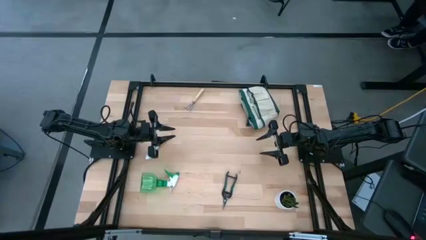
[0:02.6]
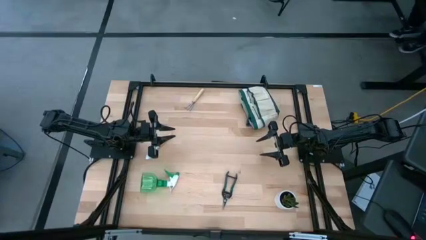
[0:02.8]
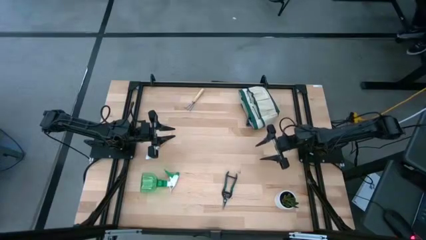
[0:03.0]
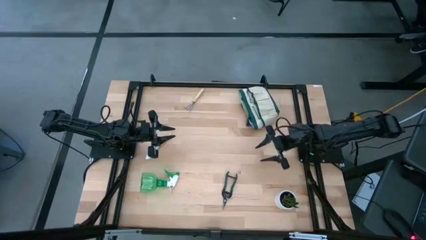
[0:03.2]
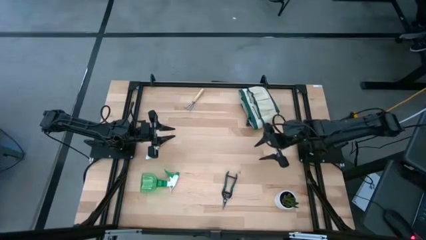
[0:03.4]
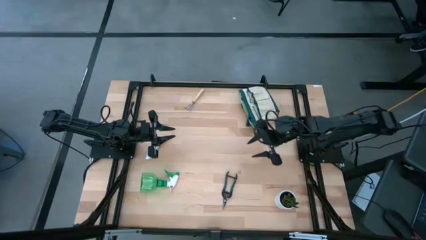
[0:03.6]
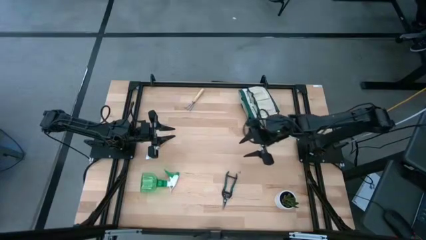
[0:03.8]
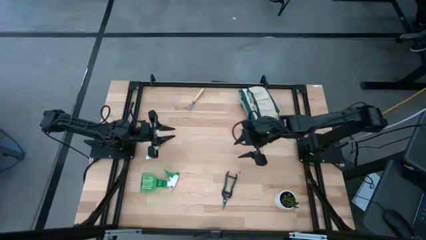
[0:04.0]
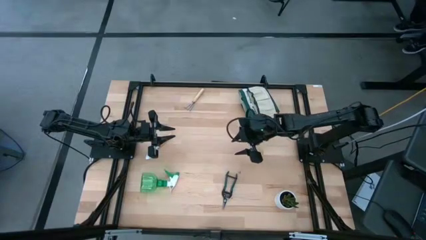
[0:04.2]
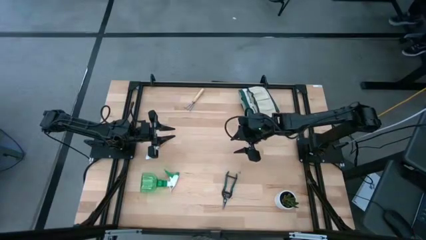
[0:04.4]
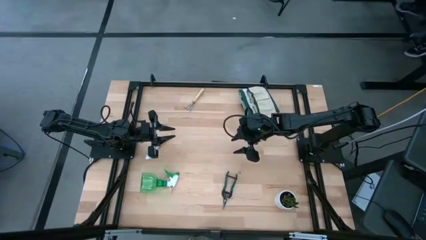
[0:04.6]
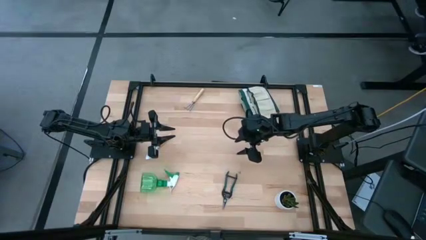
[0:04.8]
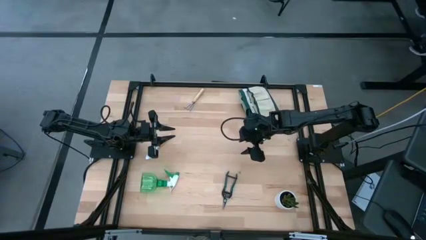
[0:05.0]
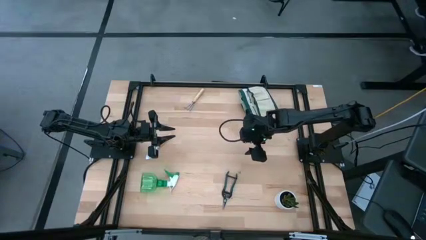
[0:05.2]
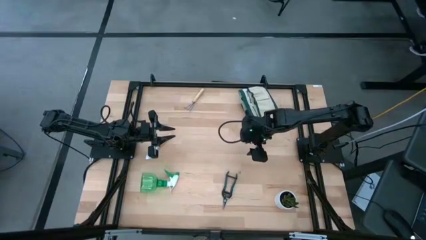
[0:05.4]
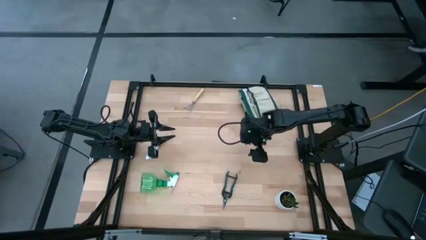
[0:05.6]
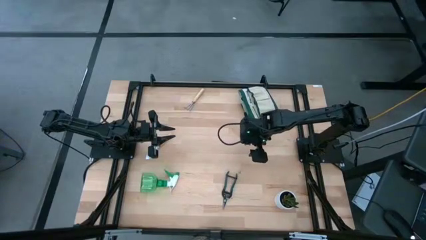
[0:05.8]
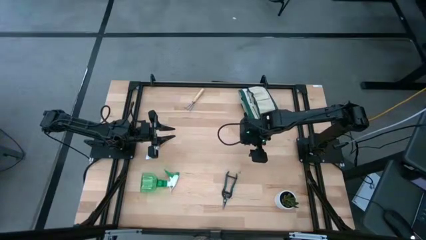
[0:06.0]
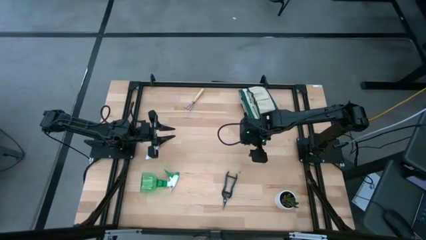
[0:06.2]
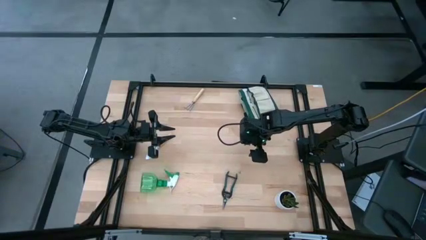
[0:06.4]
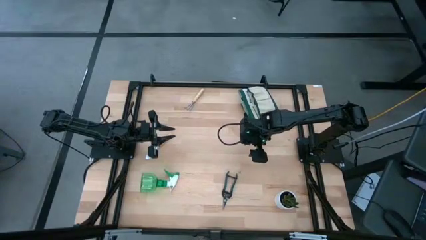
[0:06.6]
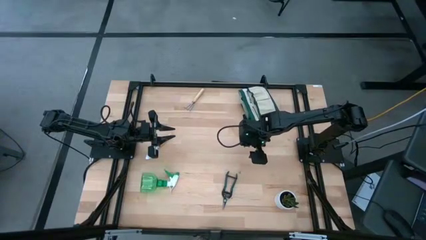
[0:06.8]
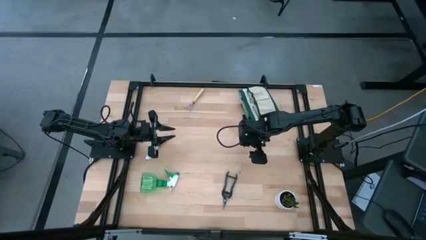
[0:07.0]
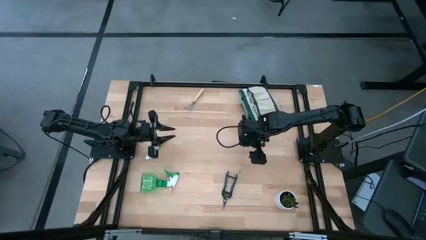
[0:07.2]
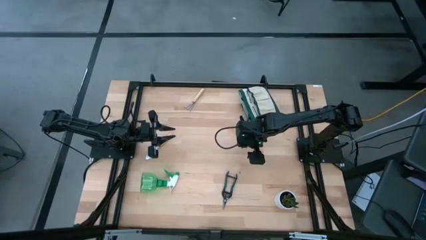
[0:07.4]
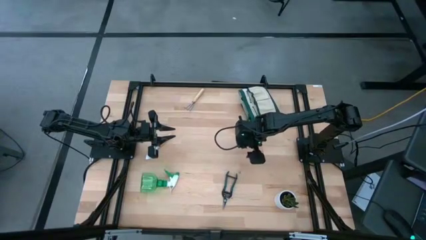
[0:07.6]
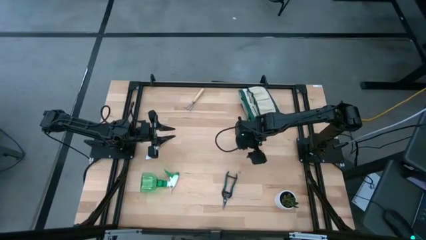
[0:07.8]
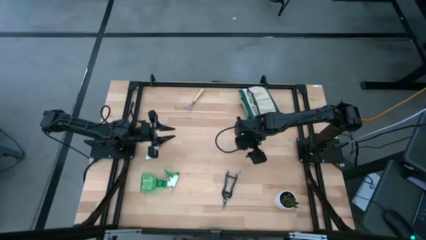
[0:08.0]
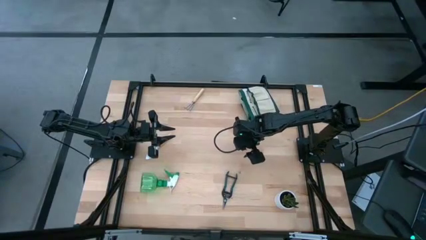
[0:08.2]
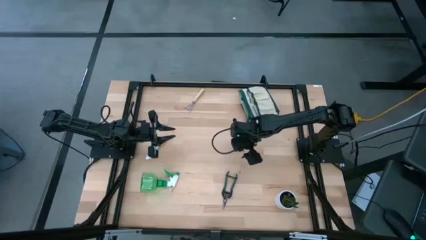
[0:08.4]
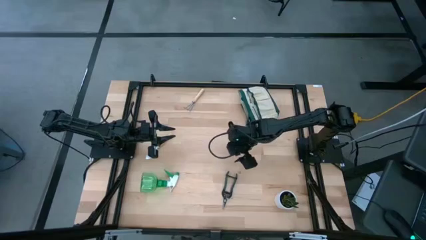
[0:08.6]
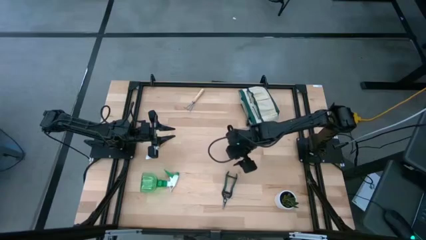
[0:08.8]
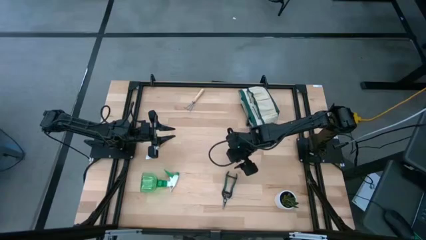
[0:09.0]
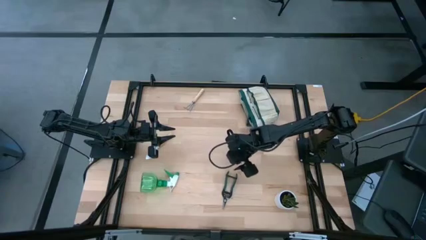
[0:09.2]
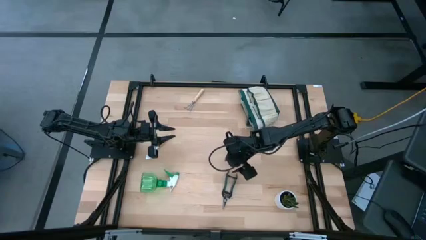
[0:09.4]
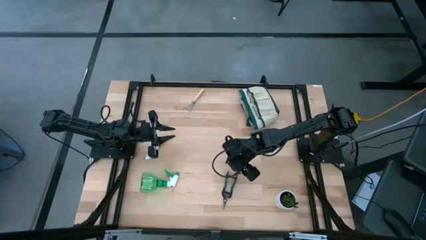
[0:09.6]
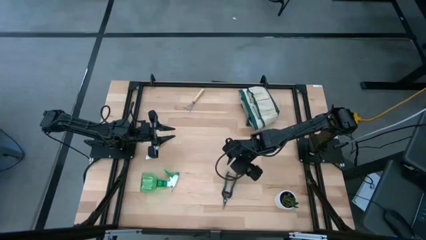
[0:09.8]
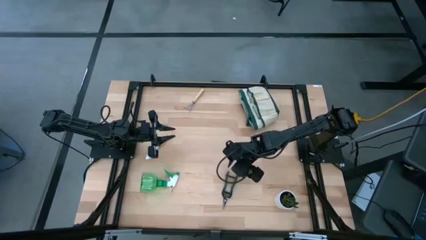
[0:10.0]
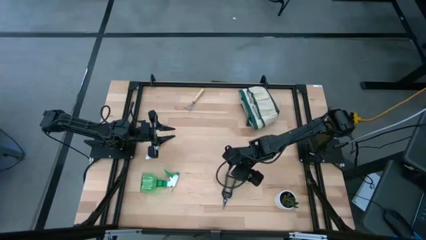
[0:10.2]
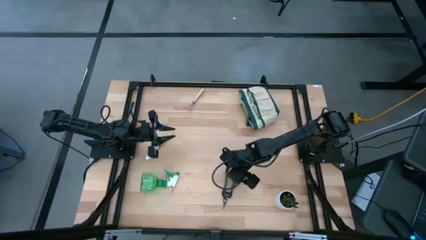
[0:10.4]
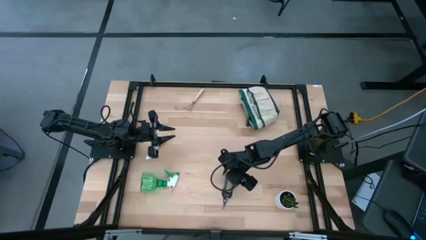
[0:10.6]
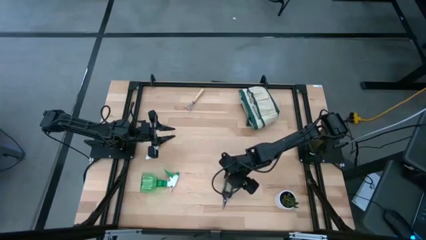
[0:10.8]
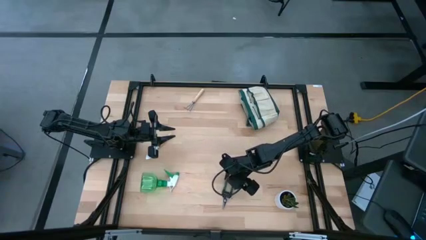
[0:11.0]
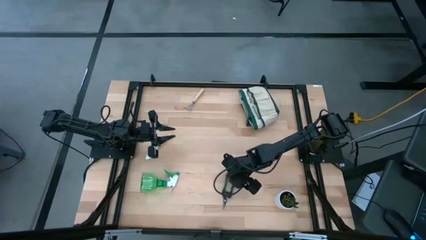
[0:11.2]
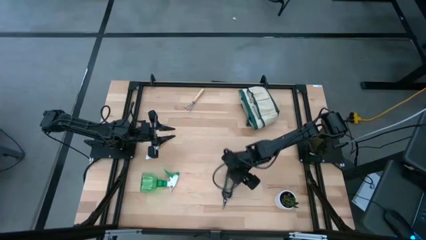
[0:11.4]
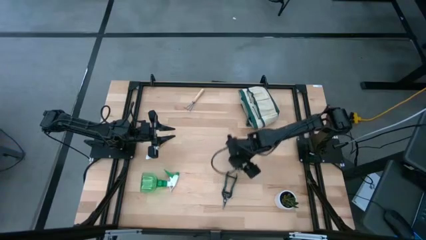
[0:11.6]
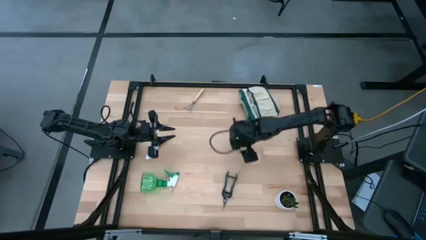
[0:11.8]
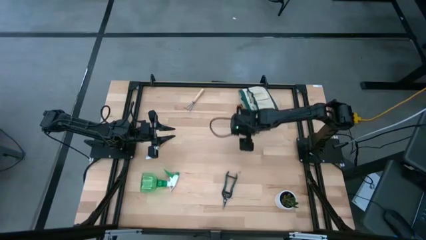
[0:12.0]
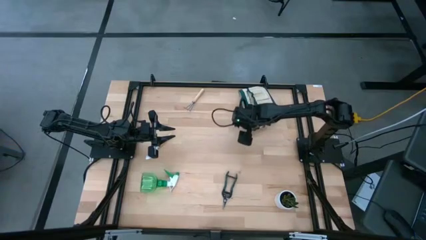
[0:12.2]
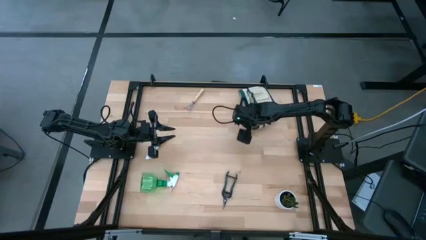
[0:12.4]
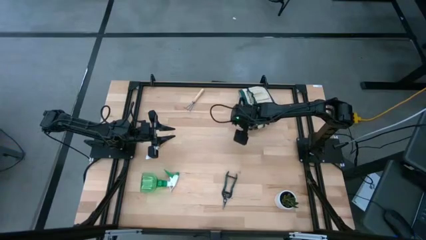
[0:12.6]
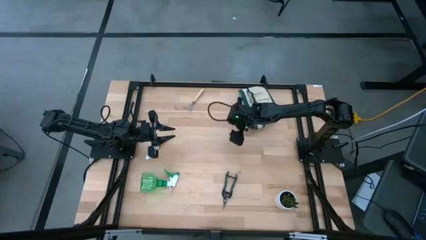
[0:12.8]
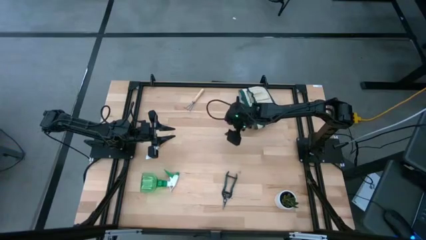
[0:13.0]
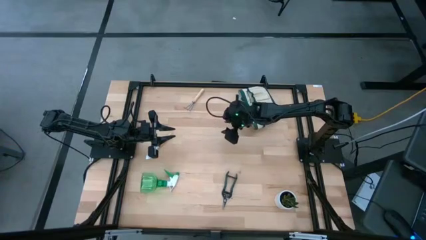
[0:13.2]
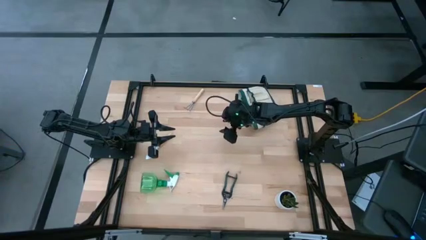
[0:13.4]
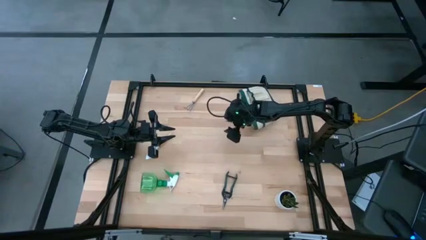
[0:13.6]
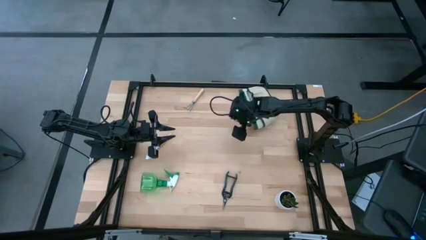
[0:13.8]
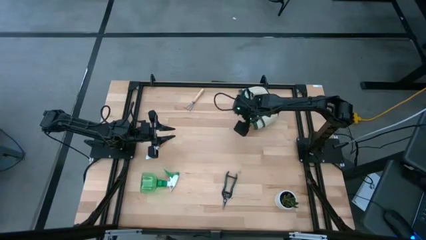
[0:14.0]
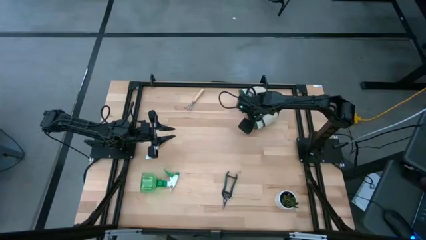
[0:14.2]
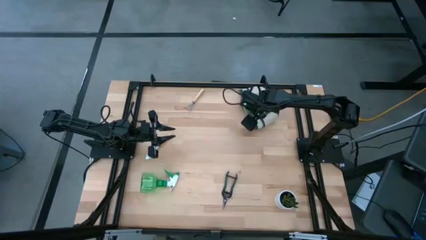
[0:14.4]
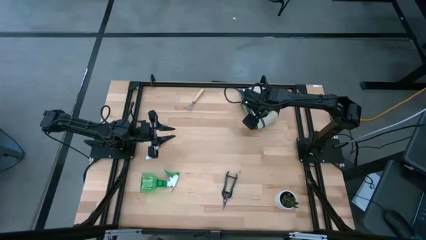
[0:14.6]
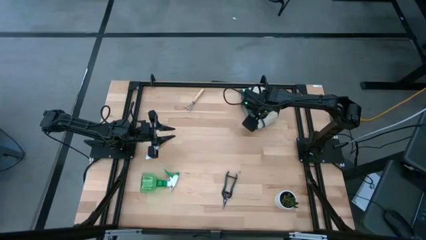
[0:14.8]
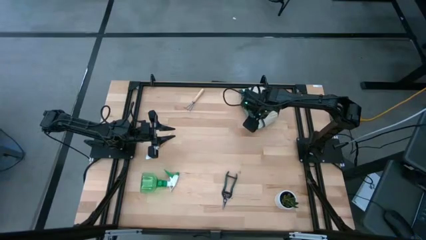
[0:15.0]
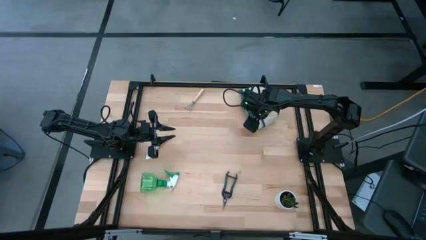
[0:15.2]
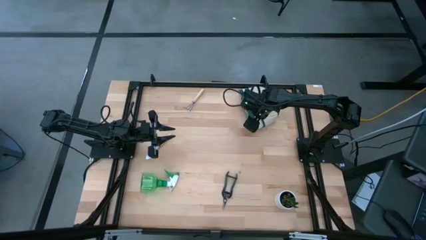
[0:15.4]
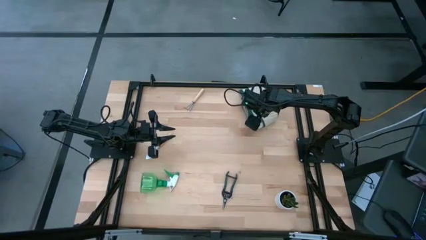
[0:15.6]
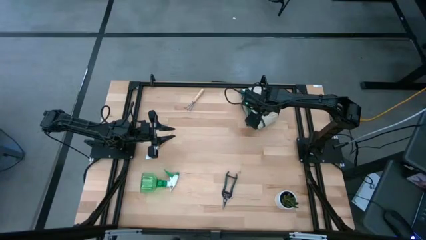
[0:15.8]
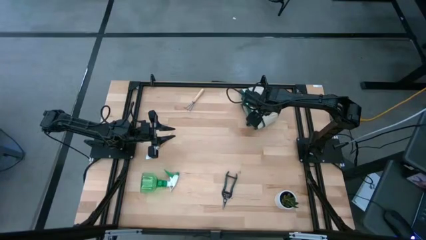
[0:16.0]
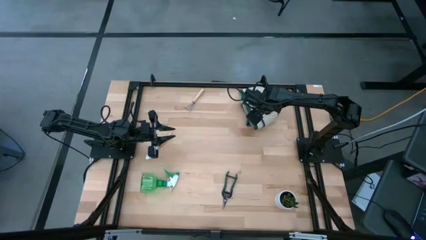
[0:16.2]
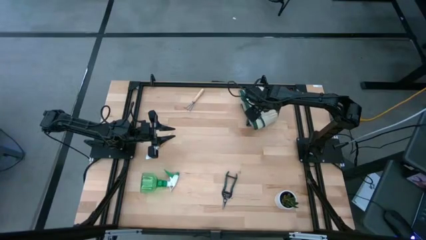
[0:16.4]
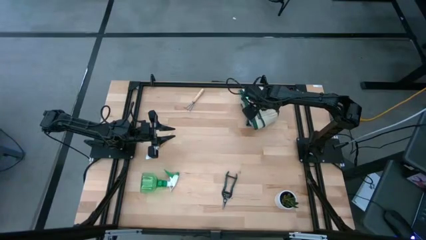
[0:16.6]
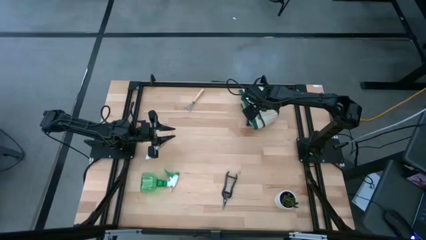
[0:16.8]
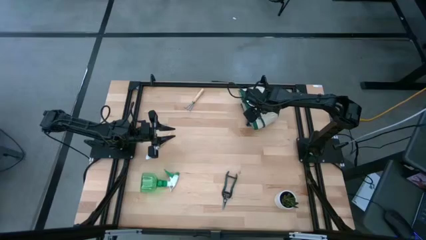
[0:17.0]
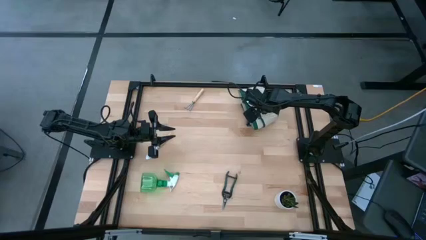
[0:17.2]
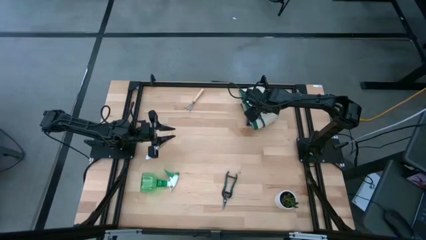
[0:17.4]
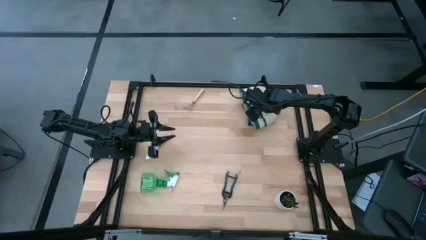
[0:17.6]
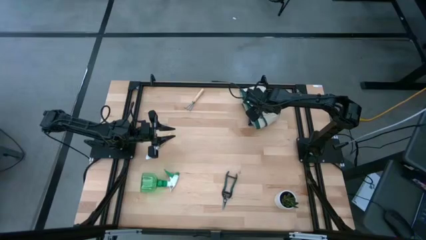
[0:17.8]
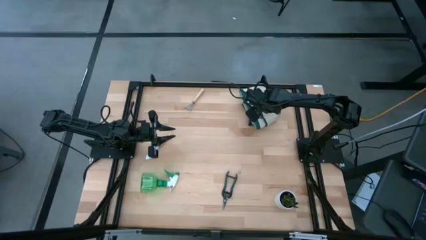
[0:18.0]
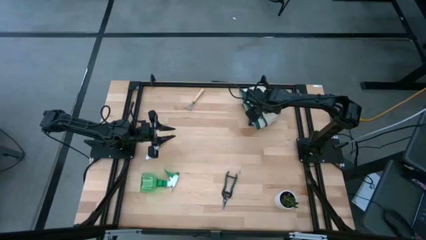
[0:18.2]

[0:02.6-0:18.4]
Task: Pick & Place Garden tools in Gardening bag
Prepare the gardening bag
